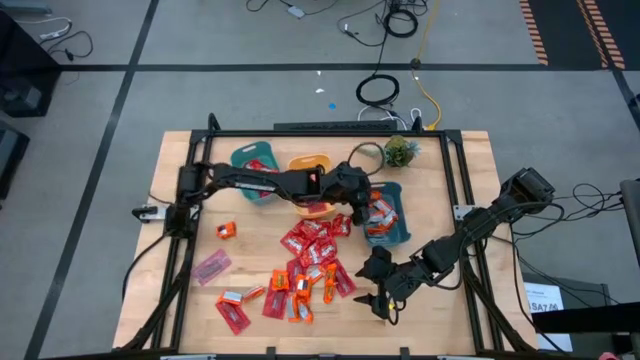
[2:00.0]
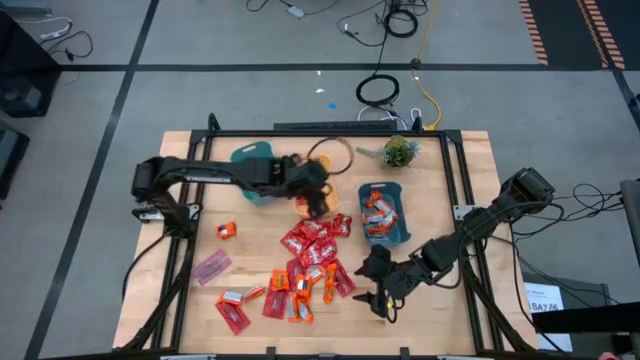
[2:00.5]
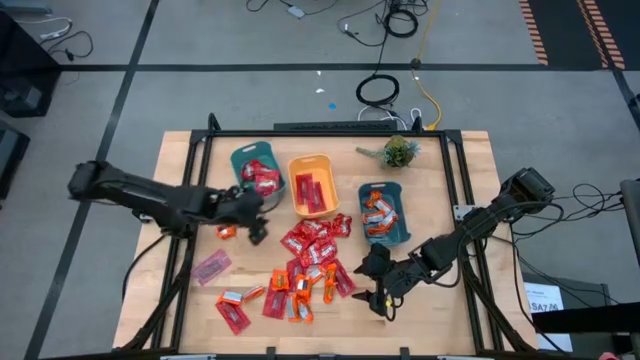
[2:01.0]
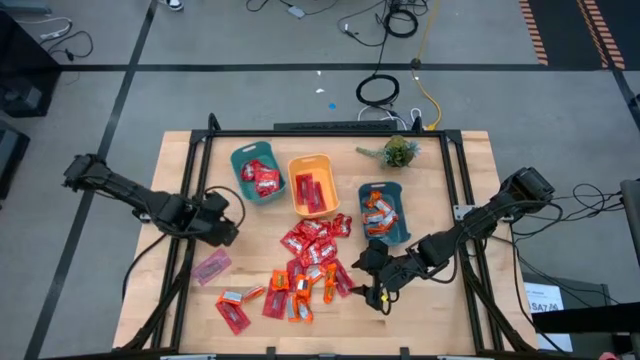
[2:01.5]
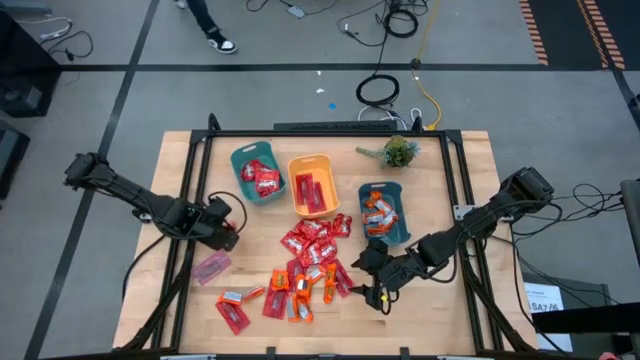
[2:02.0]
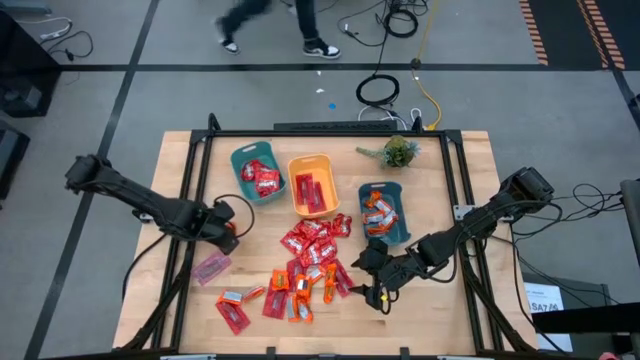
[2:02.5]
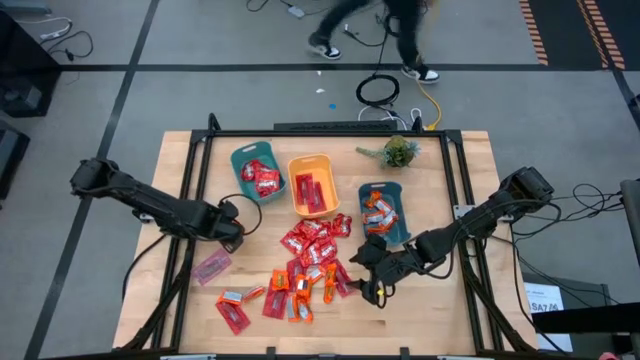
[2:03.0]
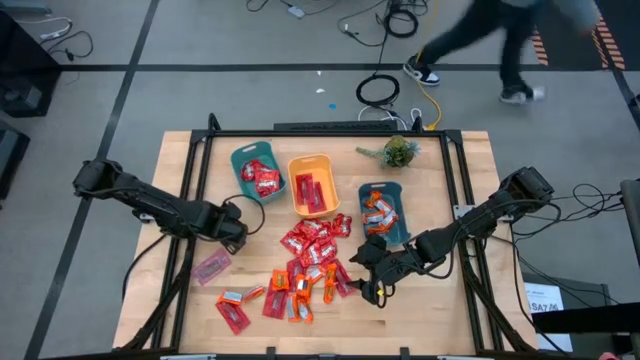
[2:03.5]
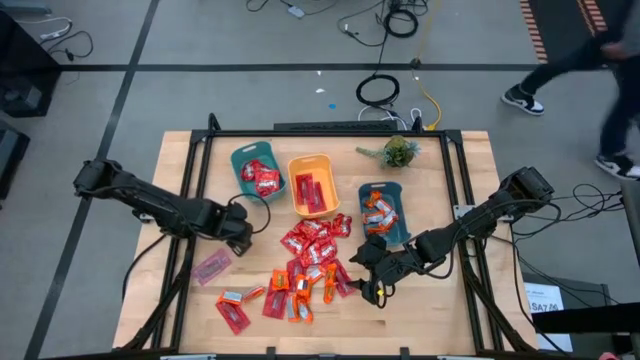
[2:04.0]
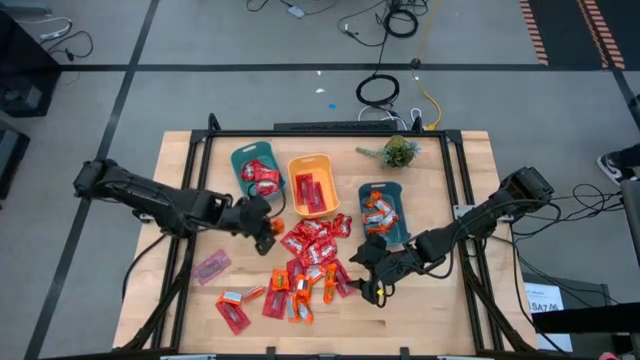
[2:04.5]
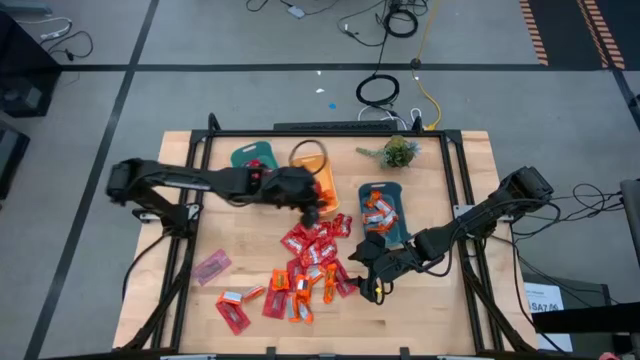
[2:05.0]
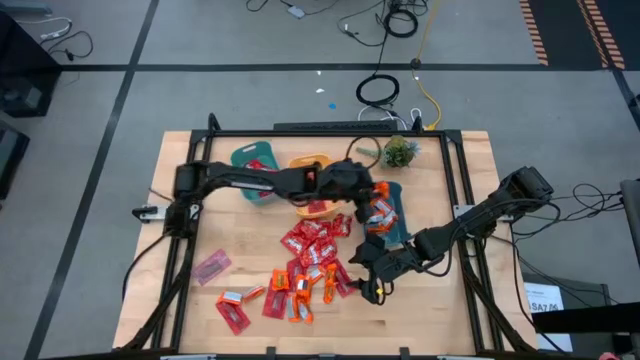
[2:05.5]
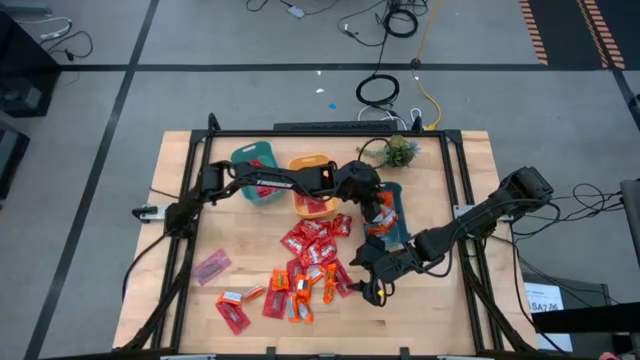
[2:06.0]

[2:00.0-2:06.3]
Task: Sort candy
Put the orange wrapper chocolate into the dark blue bin

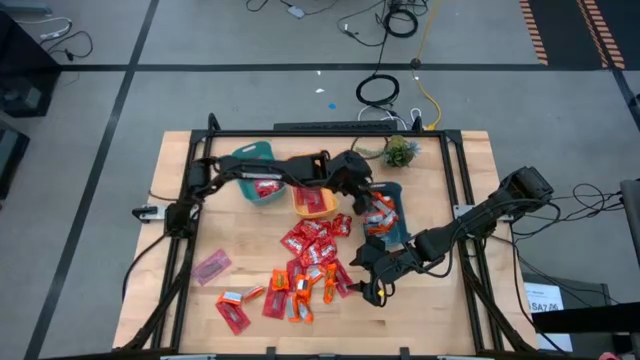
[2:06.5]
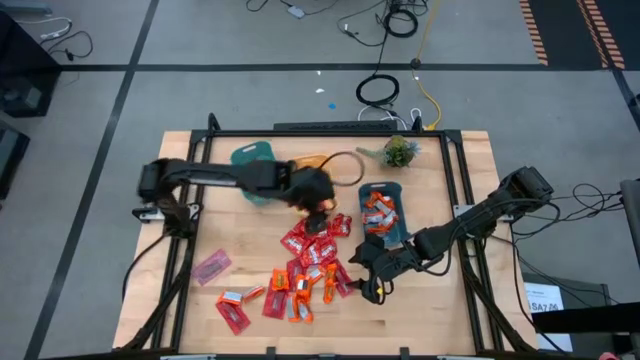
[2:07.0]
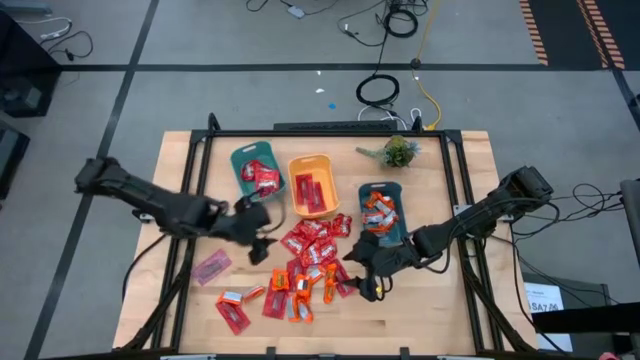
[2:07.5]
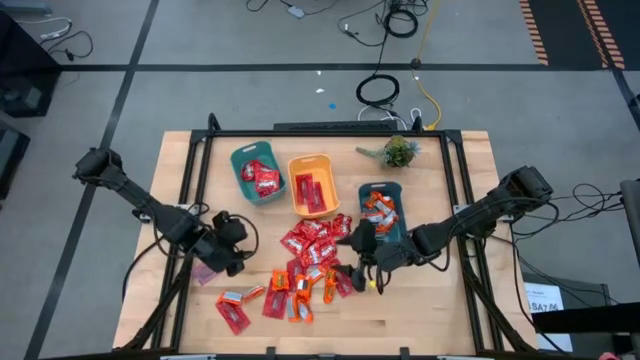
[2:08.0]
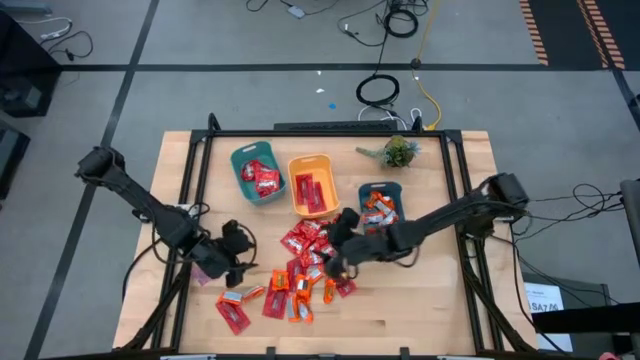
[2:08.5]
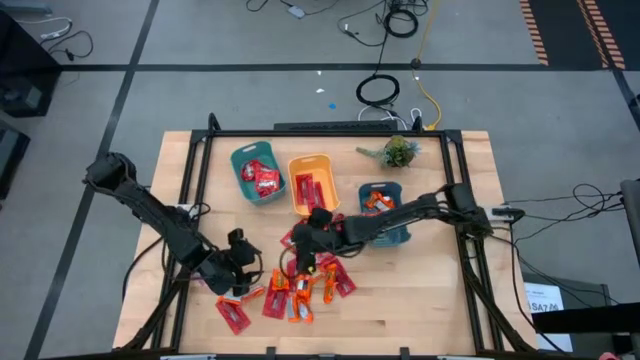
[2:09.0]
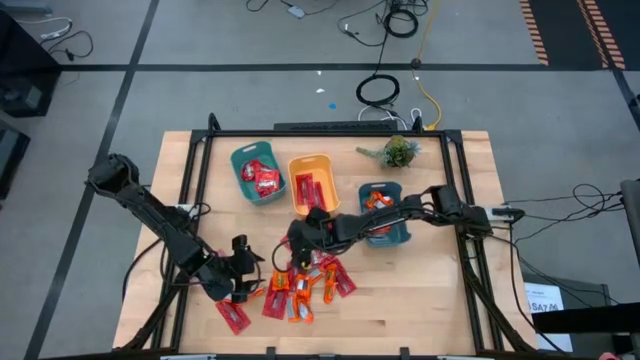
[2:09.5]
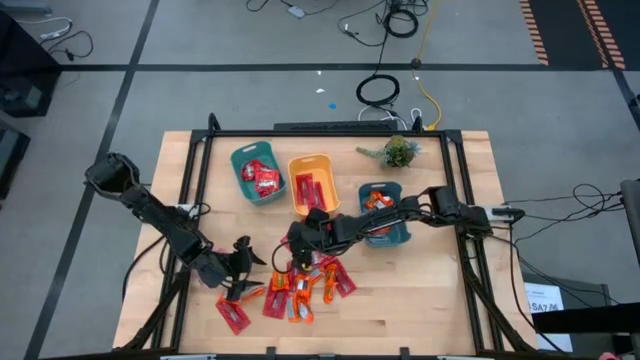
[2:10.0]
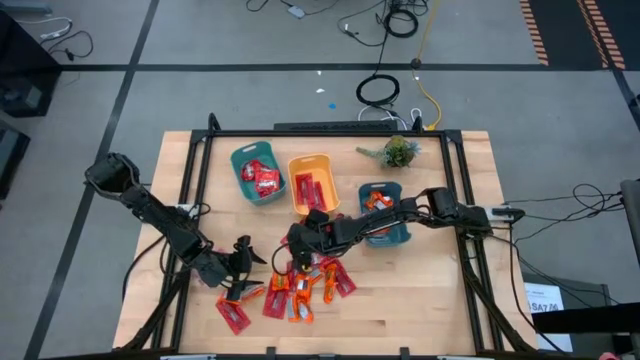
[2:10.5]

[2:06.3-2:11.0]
Put the red pack of candy into the light blue bin

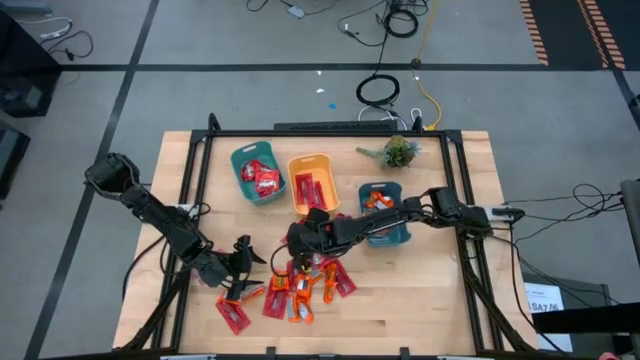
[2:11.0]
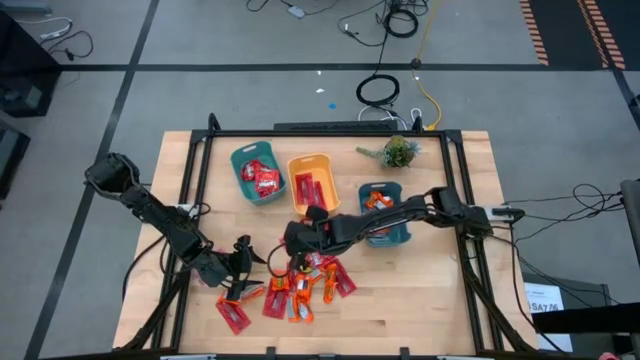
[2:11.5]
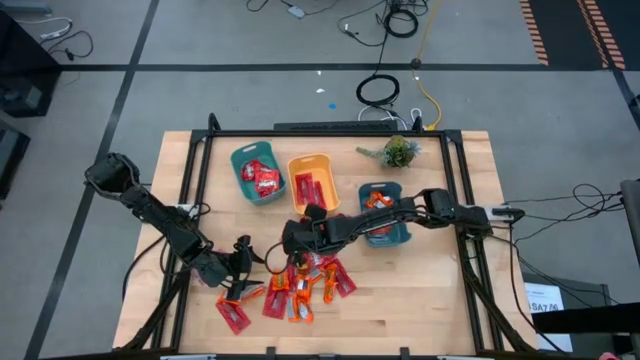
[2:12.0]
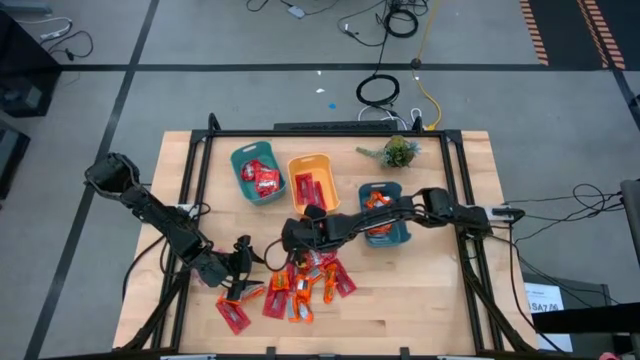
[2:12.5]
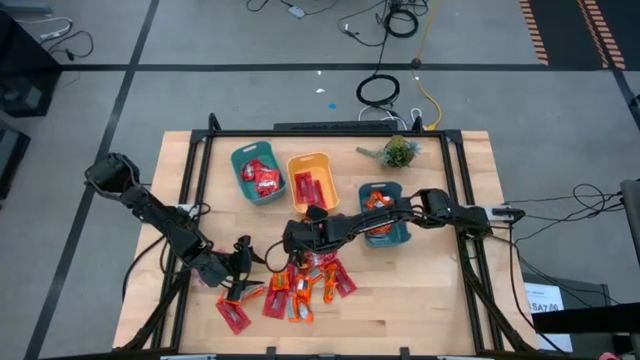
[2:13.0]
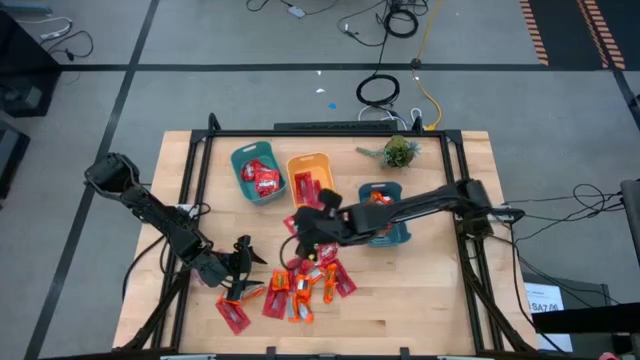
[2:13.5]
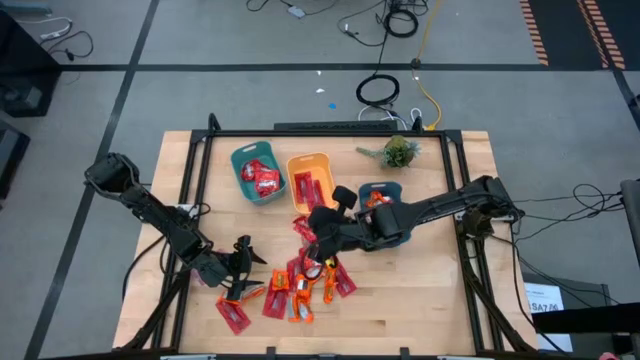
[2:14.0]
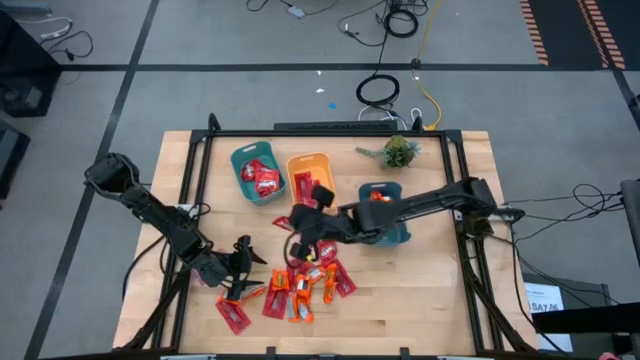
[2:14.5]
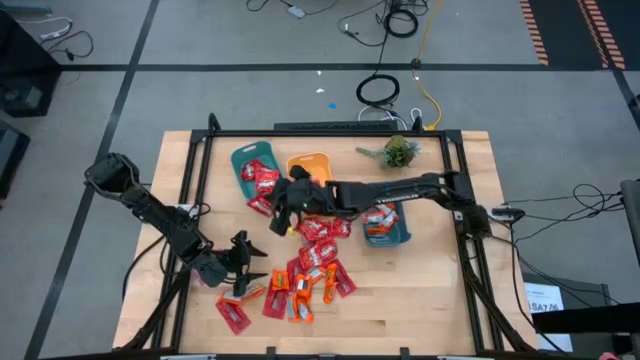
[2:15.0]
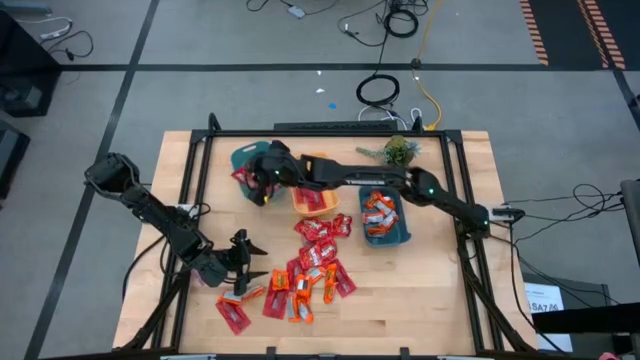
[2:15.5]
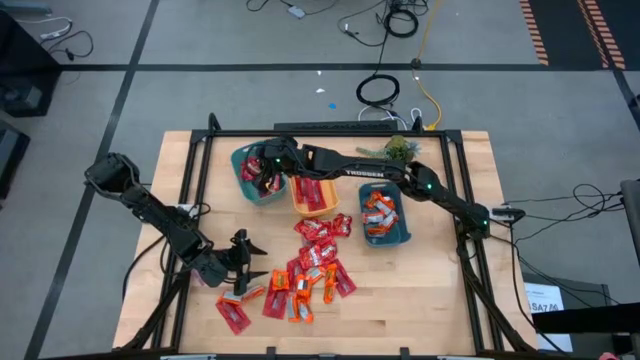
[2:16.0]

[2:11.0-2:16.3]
Put the red pack of candy into the light blue bin

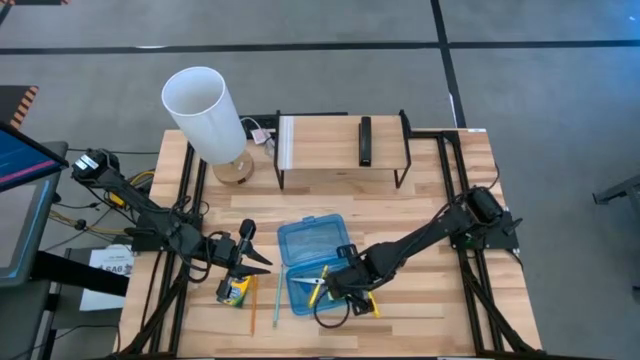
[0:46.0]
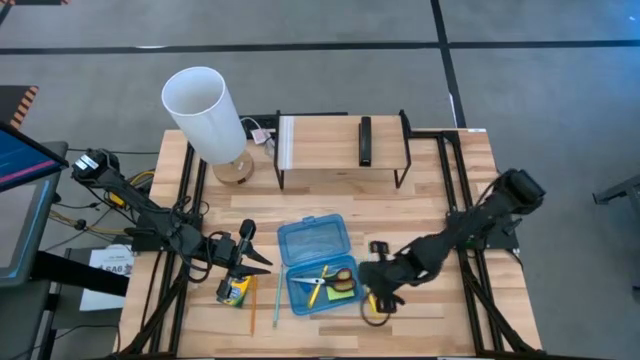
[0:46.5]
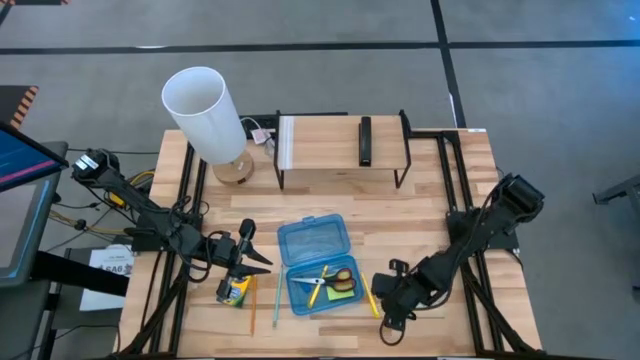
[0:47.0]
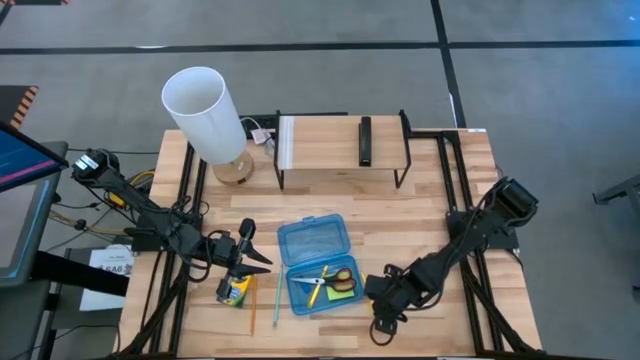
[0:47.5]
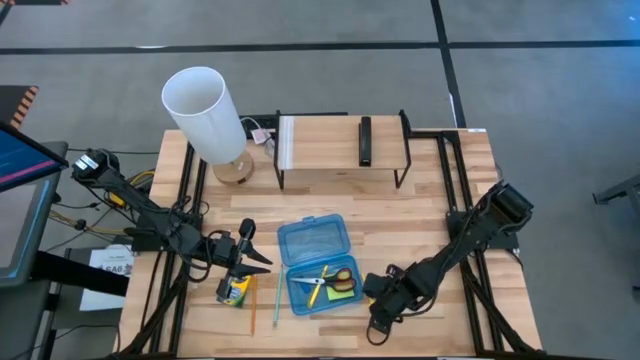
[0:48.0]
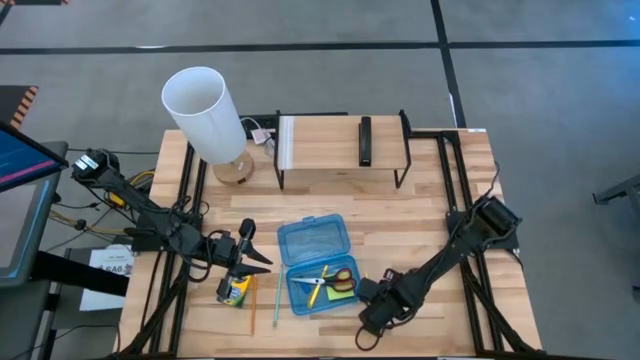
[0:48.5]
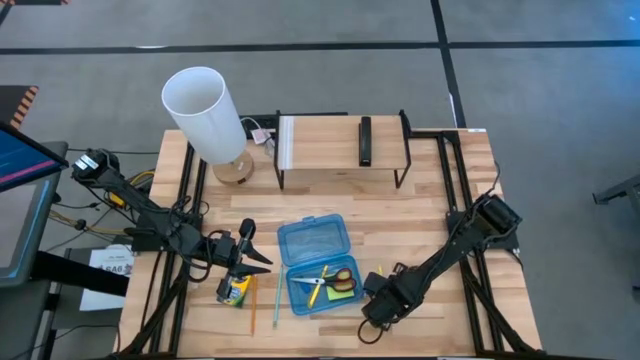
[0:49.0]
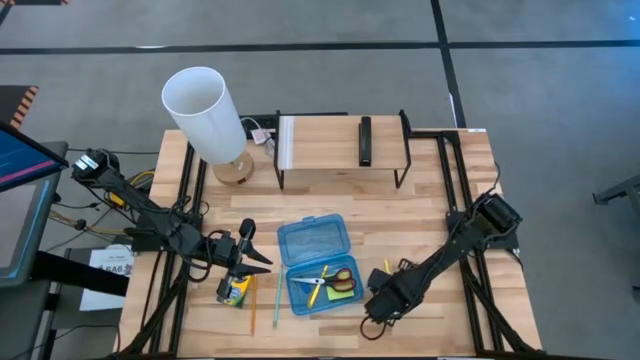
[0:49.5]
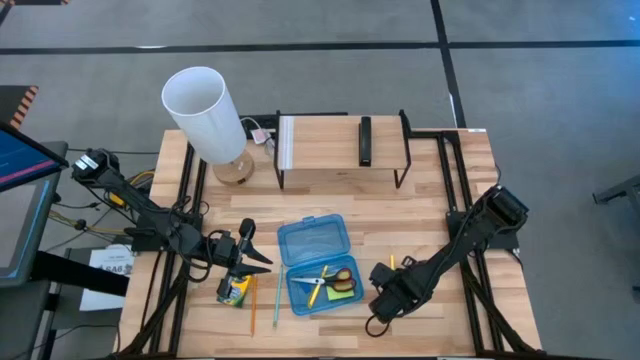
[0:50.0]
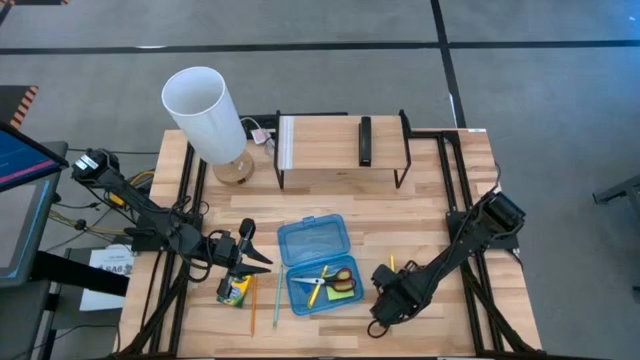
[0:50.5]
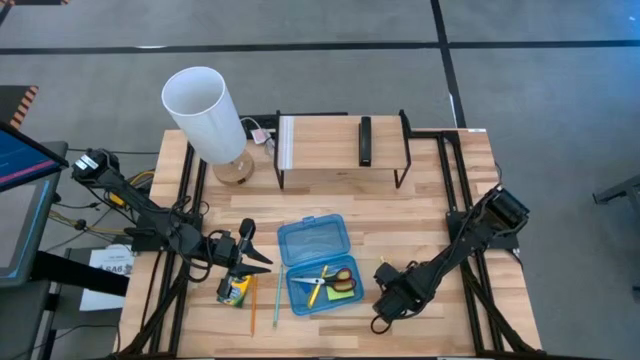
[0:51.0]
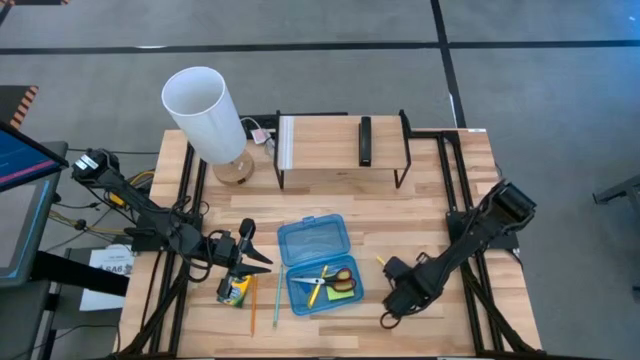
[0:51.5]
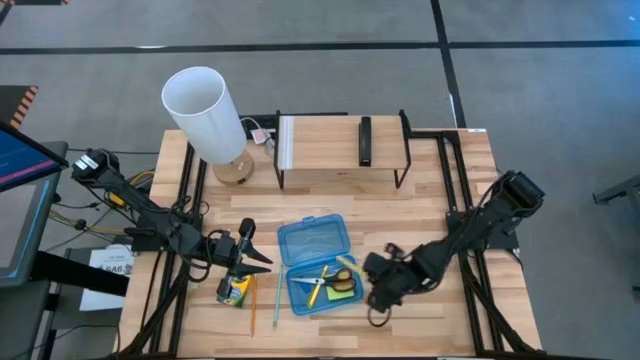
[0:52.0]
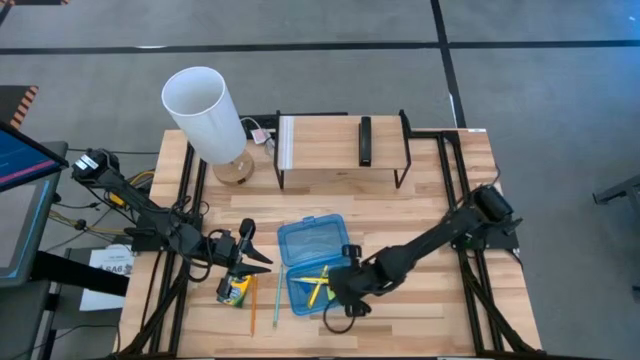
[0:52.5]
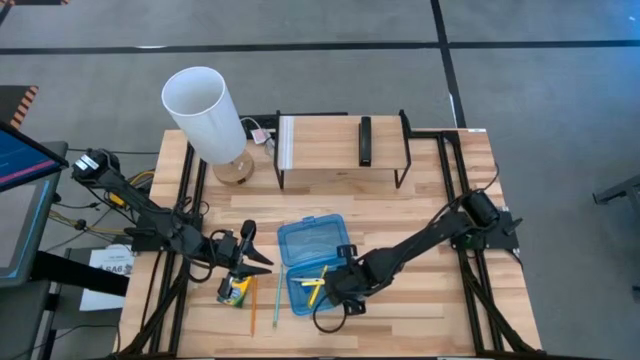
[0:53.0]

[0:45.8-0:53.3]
Task: Pack school essentials
Put the yellow pen into the blue supply box
